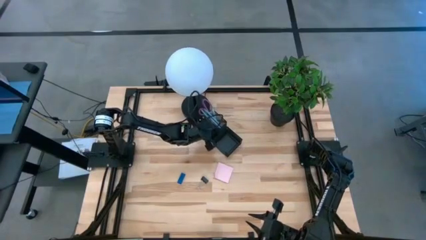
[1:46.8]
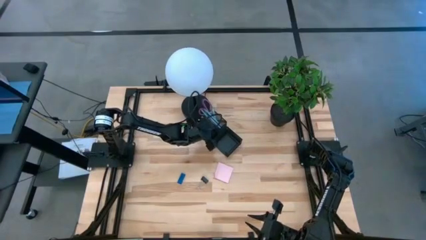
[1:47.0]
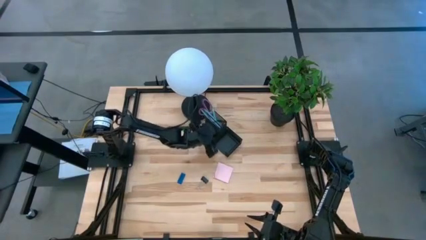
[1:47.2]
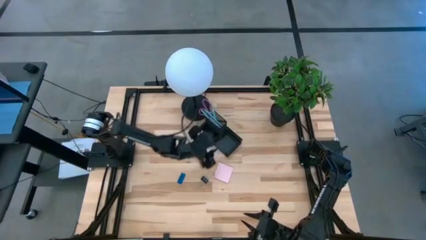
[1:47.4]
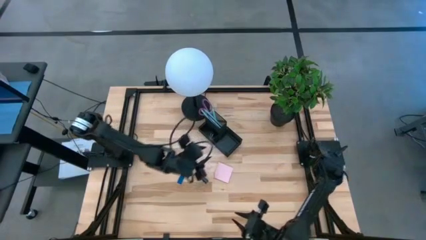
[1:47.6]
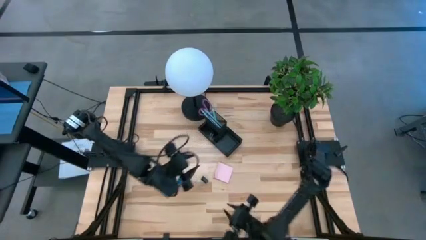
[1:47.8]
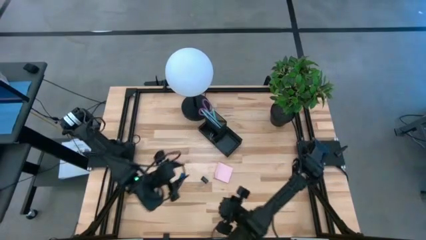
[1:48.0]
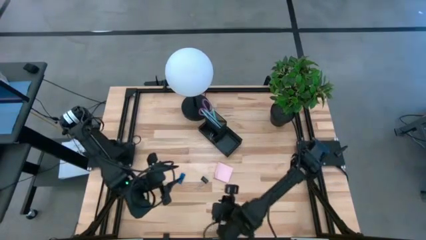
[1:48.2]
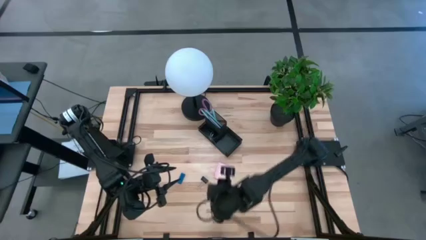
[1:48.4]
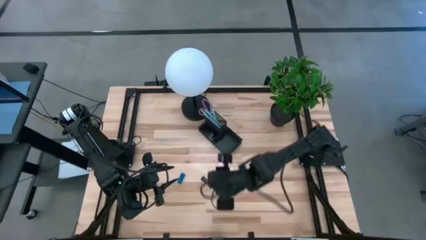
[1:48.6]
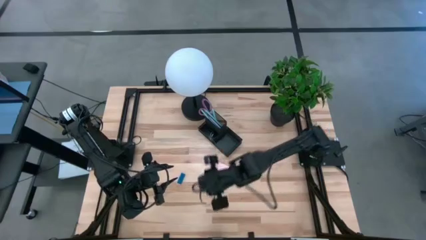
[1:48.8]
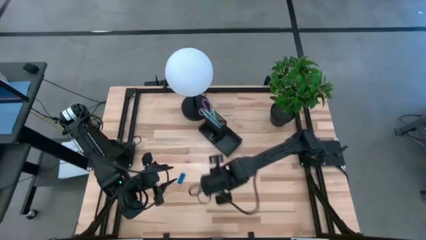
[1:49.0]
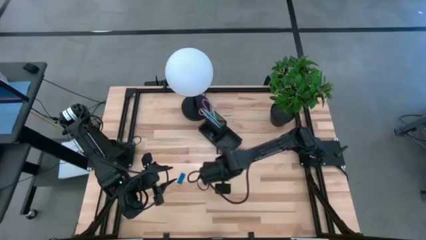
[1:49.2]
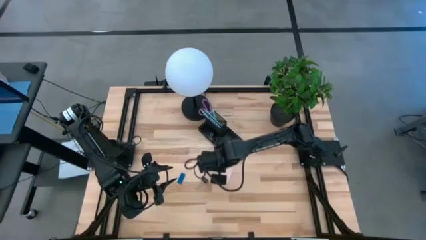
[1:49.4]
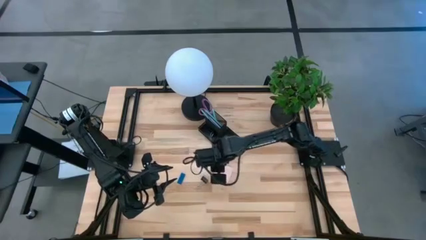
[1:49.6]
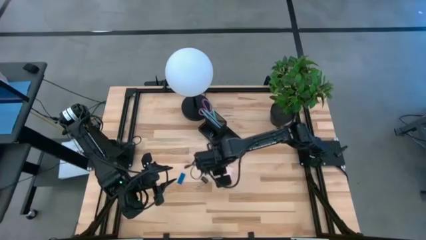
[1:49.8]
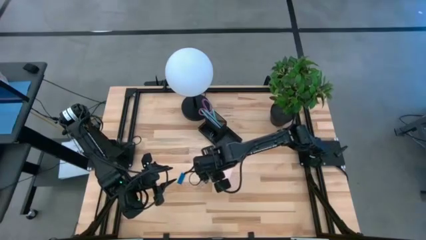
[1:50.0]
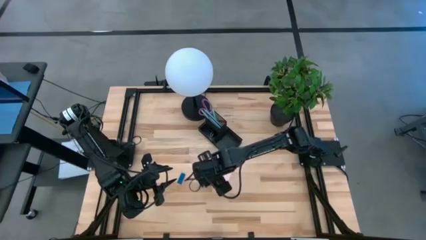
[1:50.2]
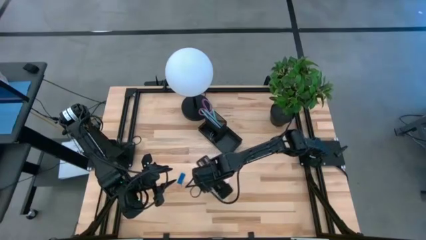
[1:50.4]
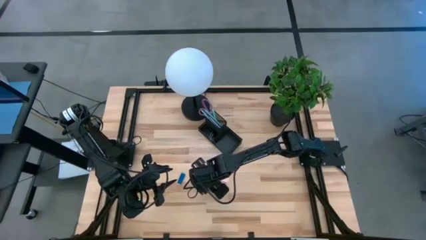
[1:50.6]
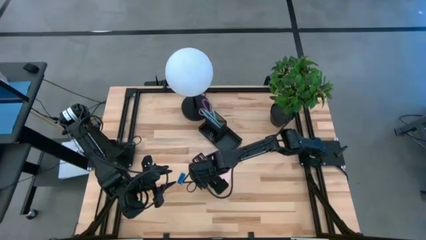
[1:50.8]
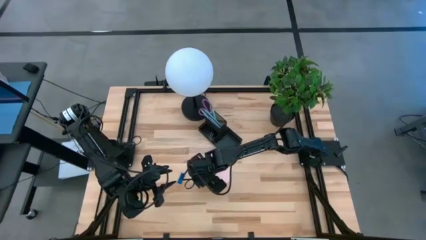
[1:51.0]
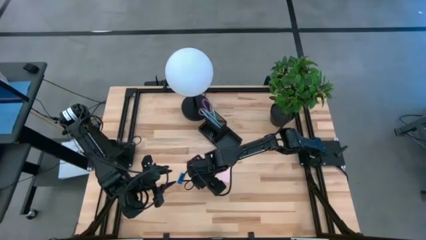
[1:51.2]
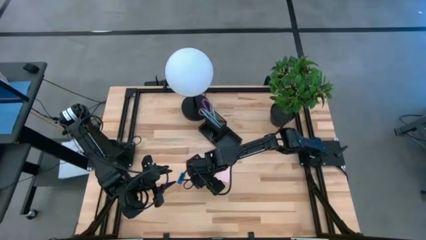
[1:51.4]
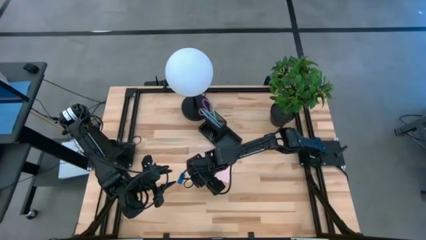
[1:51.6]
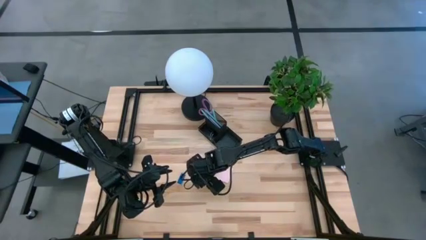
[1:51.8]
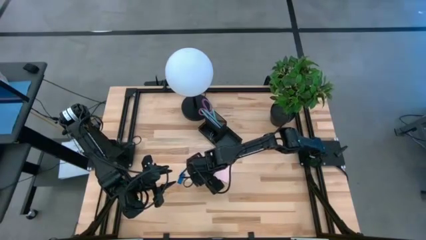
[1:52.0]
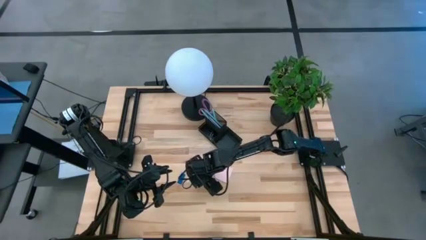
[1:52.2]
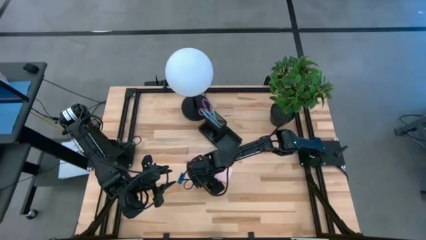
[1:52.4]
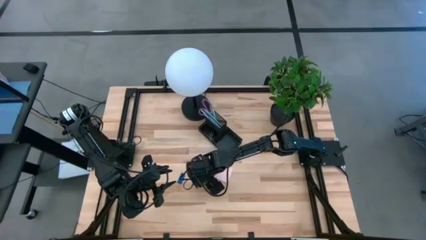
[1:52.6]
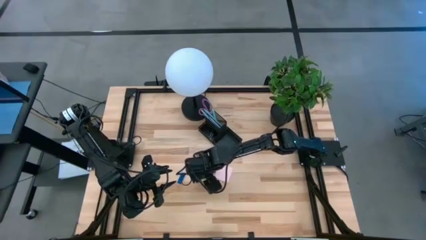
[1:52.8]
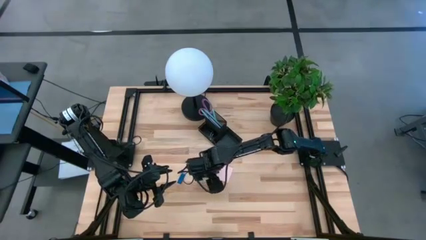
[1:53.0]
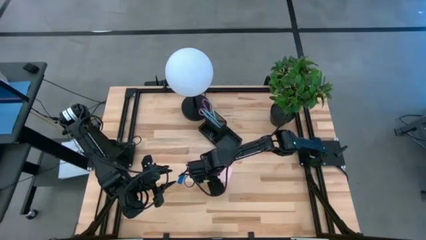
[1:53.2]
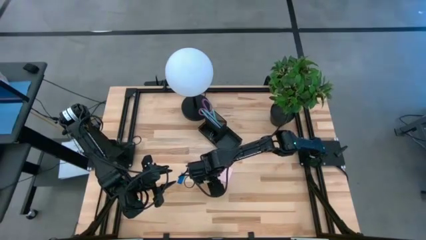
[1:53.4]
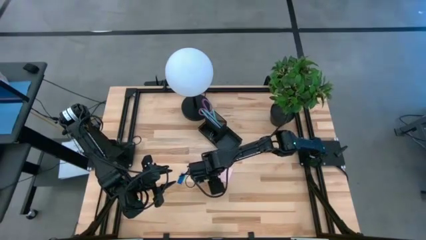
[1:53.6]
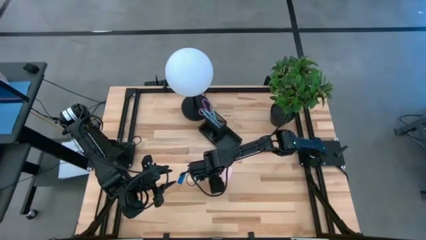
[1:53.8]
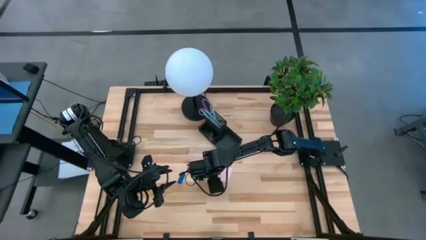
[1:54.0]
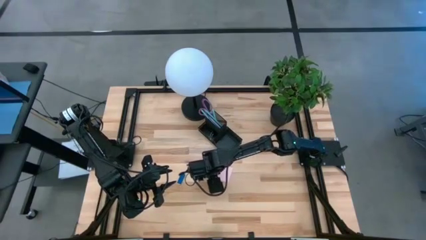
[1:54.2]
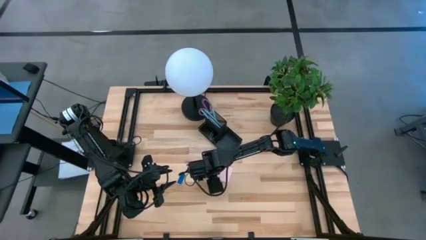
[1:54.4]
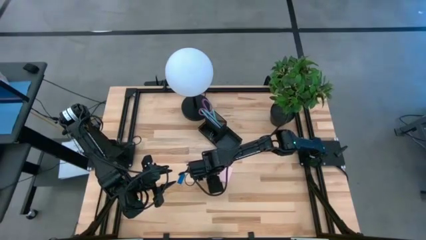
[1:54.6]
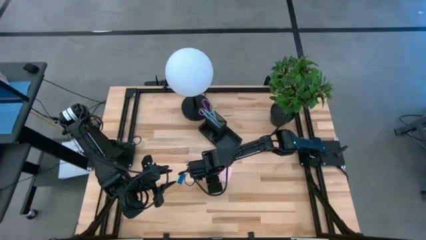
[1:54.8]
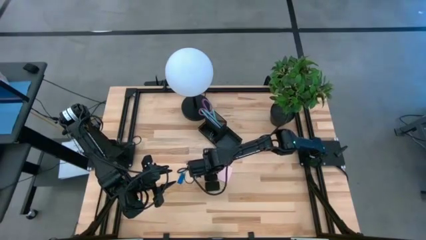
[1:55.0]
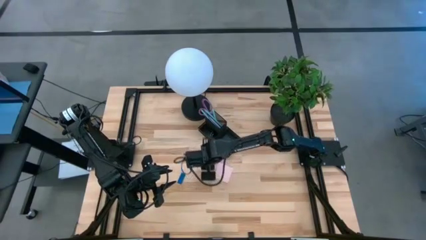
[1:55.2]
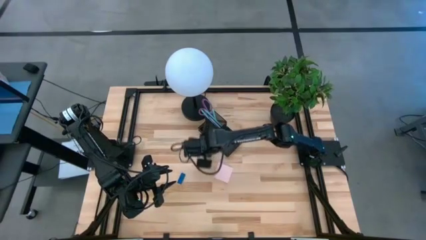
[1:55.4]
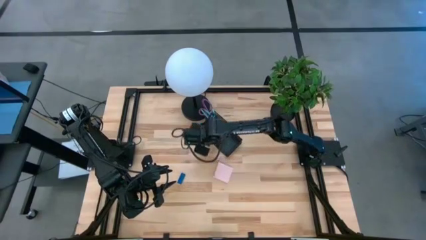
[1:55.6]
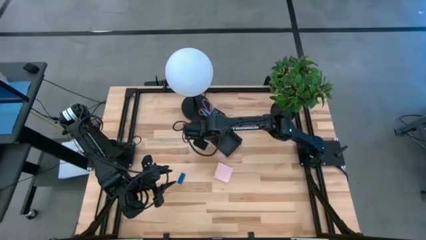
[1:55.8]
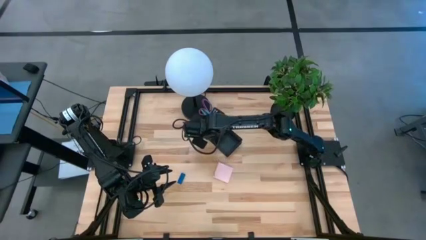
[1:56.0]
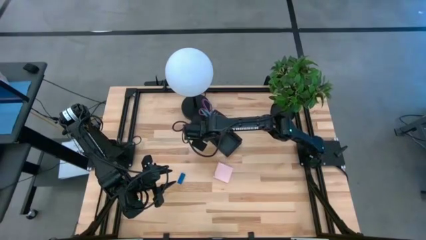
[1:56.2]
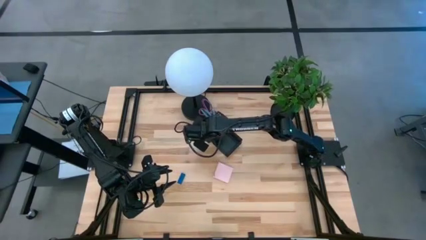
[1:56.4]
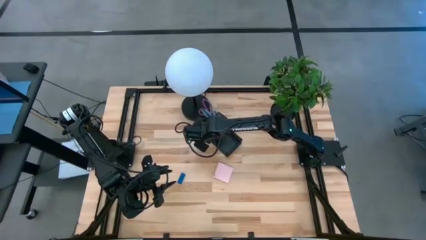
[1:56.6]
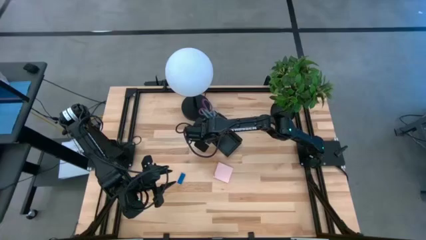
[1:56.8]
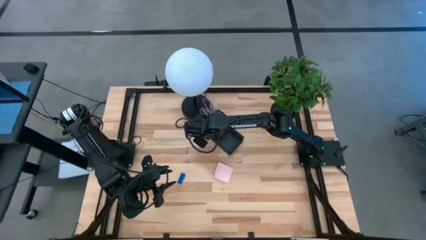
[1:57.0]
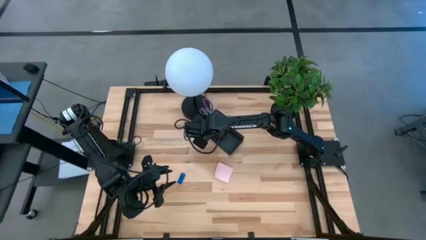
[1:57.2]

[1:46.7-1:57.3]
Task: Pick and place office supplies into organizer
Put the black binder clip into the desk organizer
